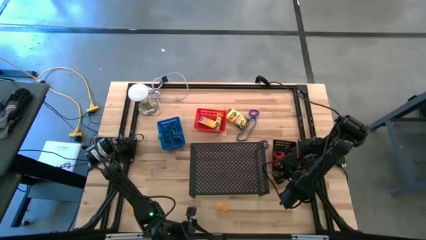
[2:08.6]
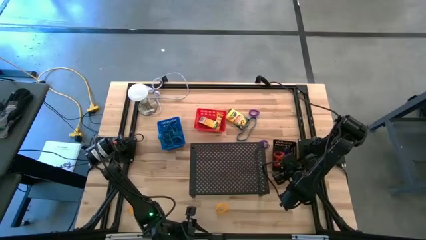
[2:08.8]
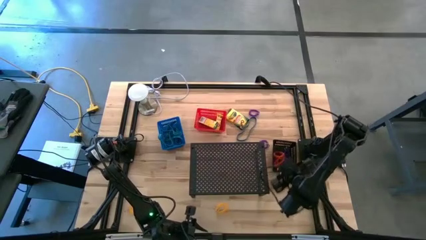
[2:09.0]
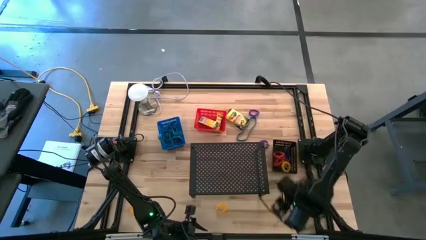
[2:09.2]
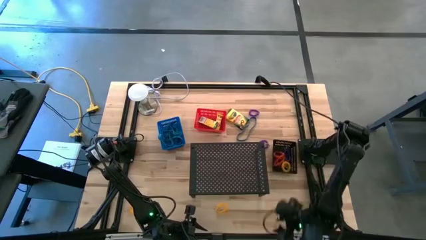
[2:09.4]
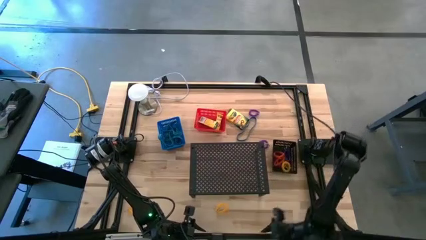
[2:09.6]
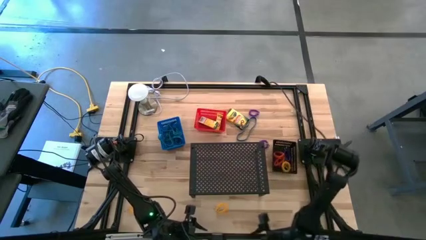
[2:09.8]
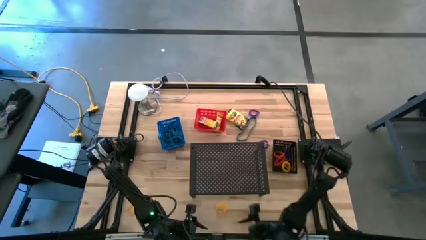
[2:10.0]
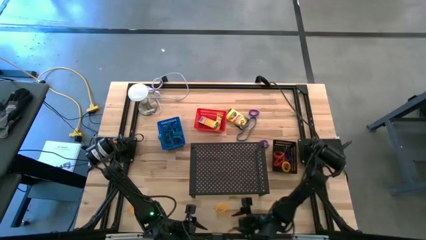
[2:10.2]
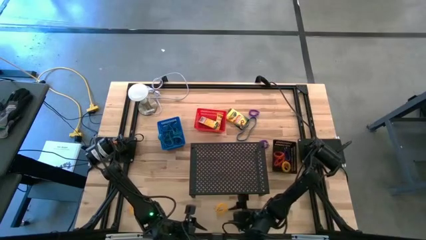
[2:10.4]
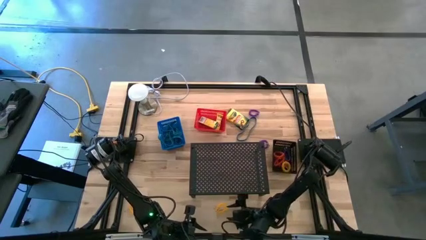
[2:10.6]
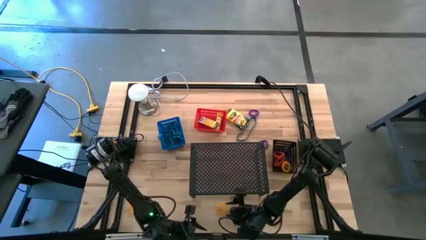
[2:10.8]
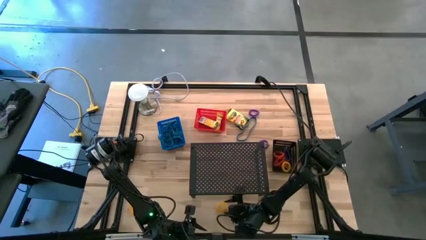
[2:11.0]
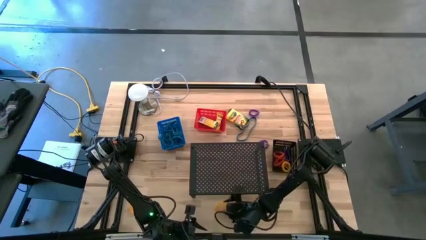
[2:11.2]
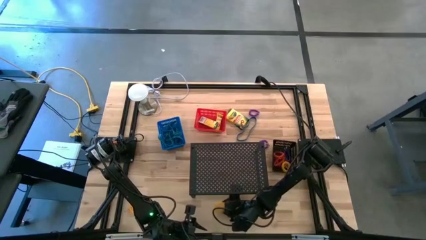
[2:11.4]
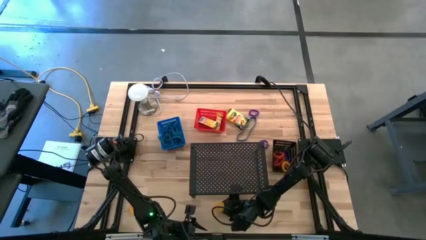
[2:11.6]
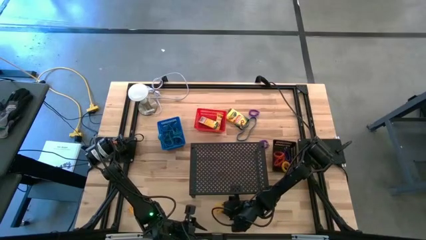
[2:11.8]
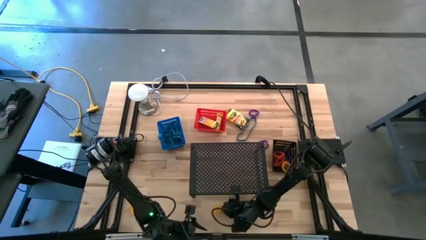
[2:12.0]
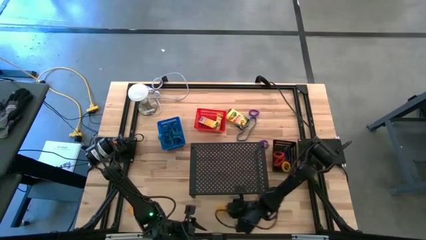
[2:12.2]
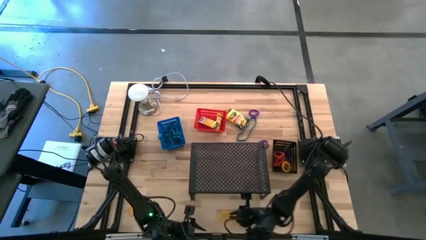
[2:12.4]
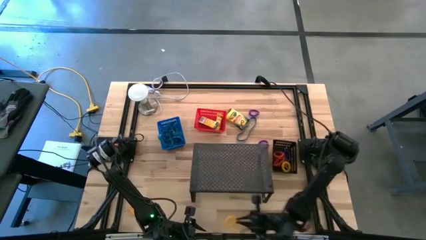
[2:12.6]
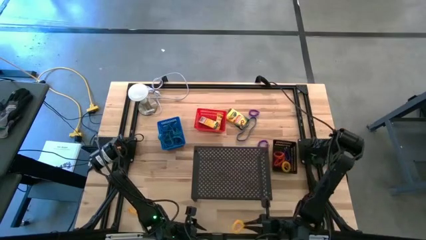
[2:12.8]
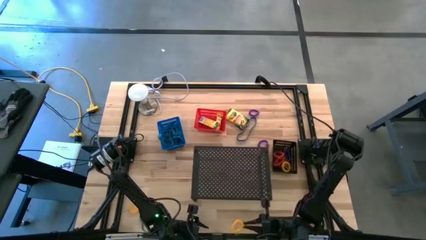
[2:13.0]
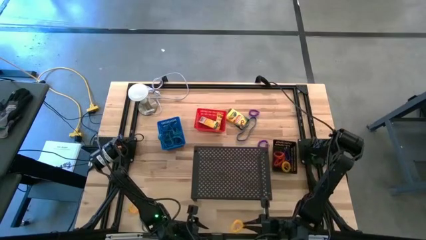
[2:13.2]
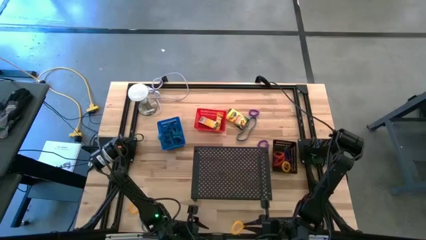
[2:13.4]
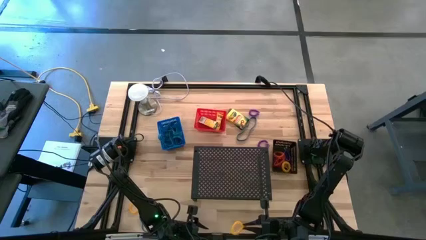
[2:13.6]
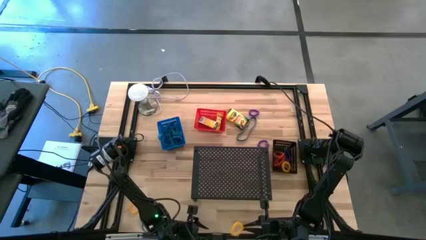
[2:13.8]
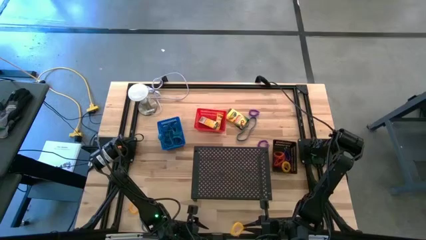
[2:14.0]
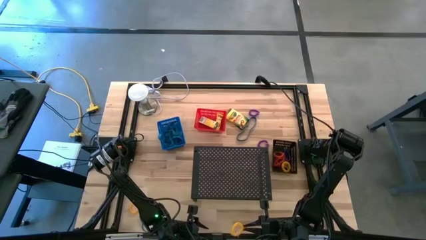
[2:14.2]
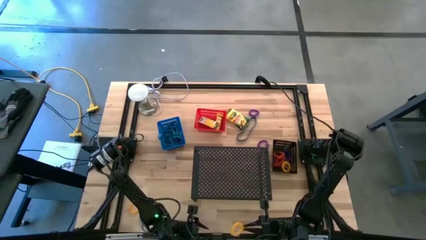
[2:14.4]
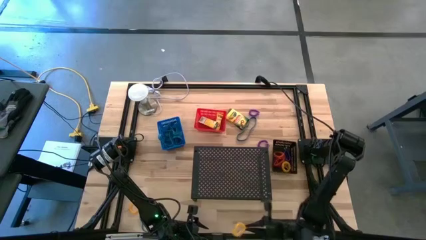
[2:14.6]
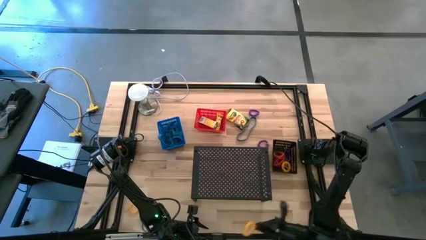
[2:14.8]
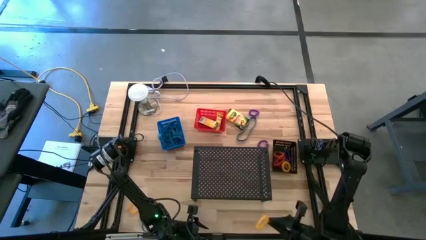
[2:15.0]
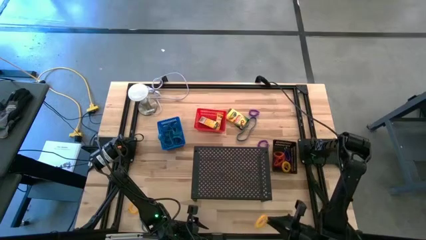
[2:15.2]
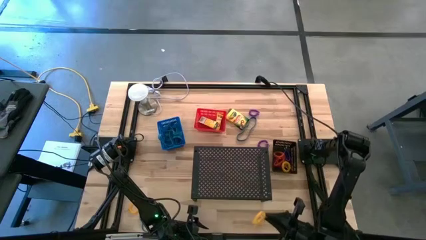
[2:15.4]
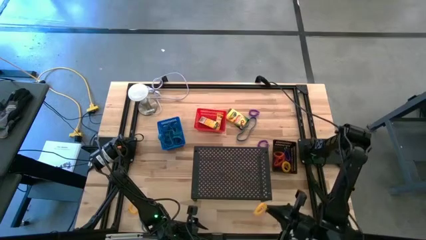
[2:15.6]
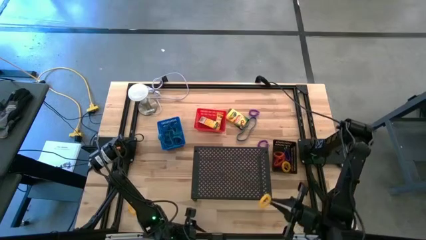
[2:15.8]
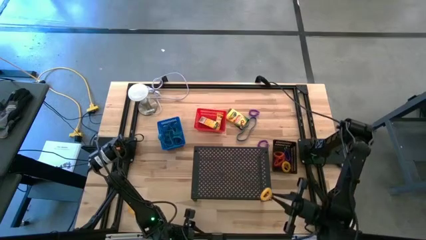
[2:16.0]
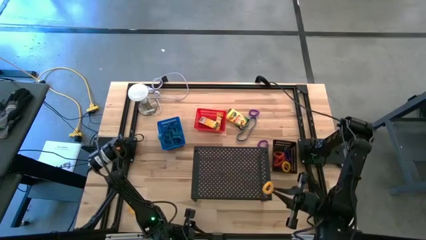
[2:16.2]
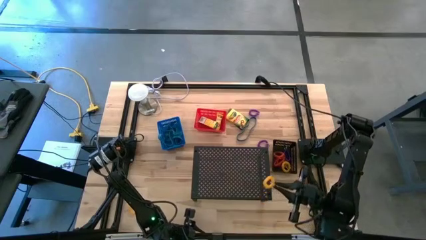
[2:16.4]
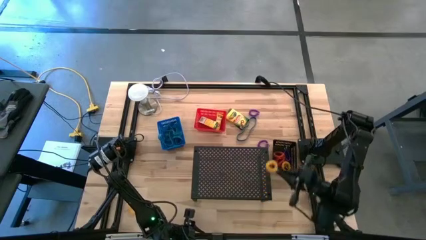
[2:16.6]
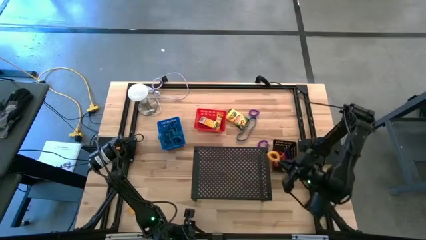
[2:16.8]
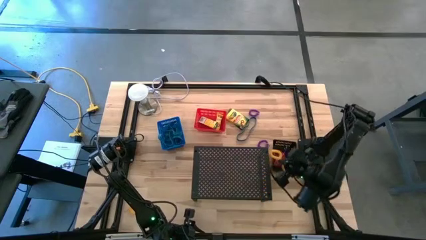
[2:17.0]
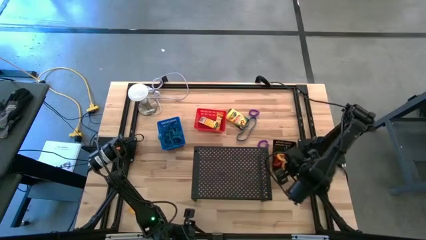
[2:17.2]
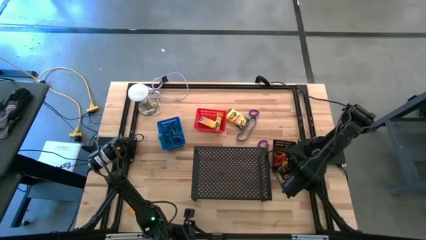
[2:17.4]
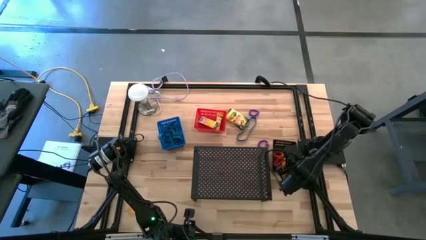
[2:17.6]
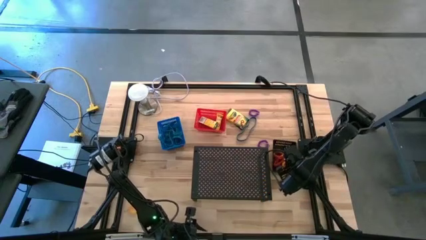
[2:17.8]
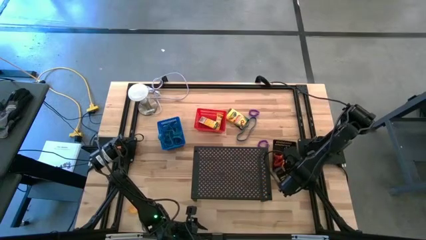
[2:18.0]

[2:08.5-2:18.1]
Task: Pick & Place Office Desk Supplies
Put he yellow spring keychain into the black bin

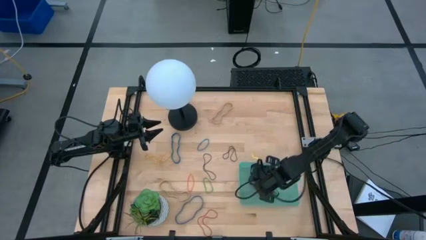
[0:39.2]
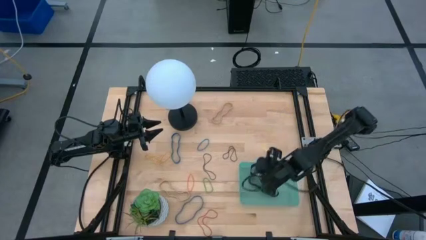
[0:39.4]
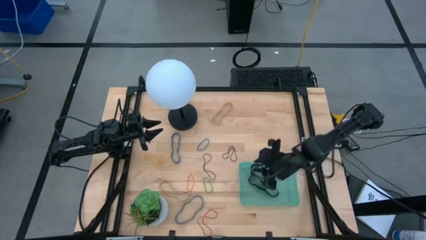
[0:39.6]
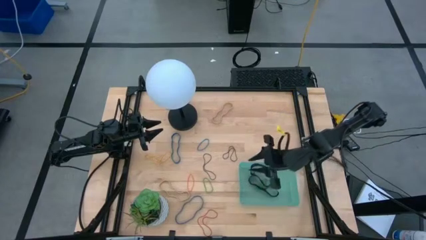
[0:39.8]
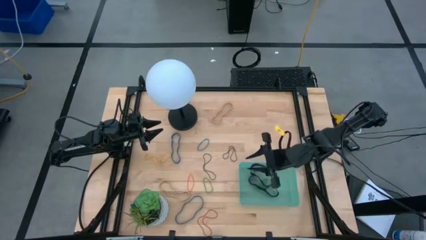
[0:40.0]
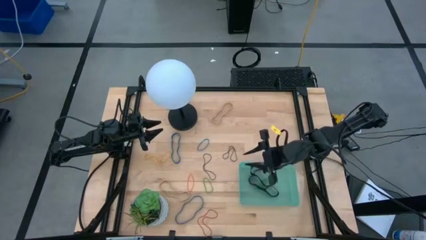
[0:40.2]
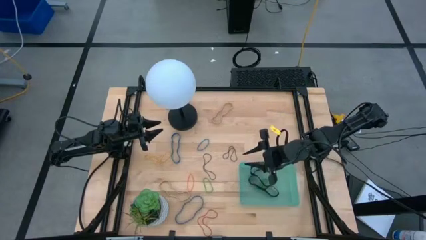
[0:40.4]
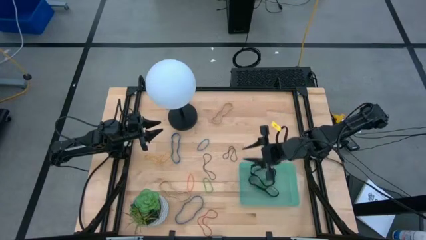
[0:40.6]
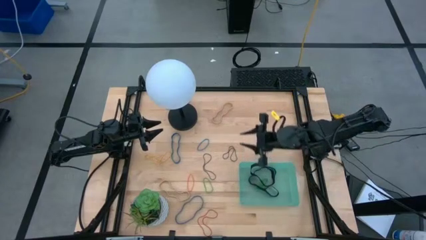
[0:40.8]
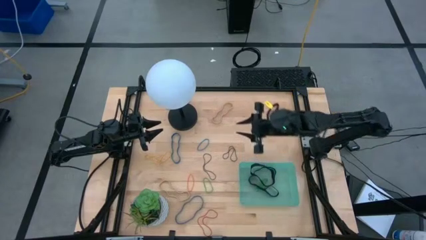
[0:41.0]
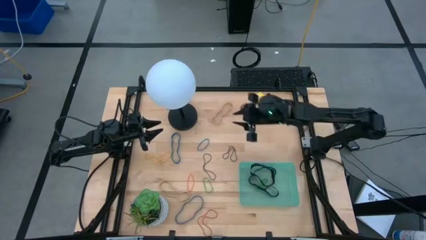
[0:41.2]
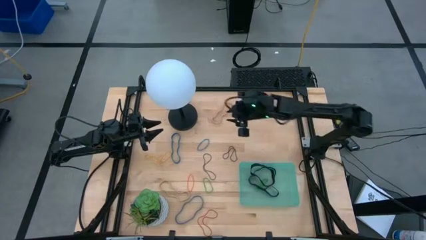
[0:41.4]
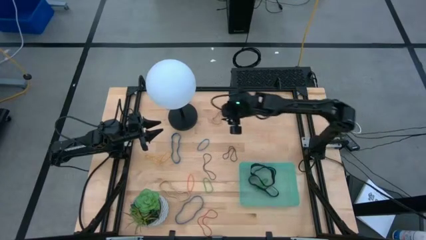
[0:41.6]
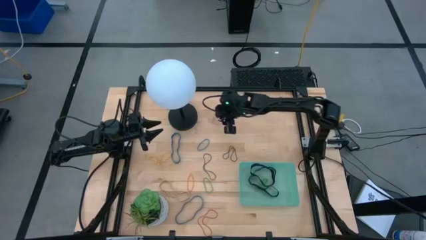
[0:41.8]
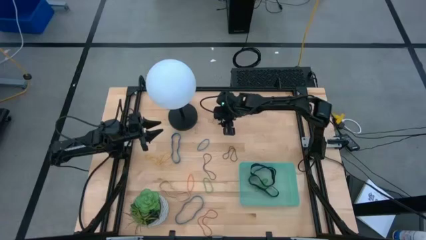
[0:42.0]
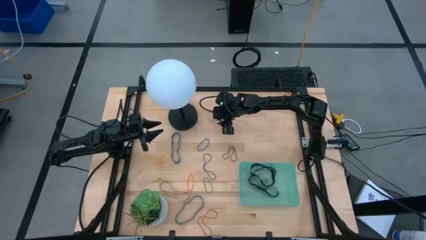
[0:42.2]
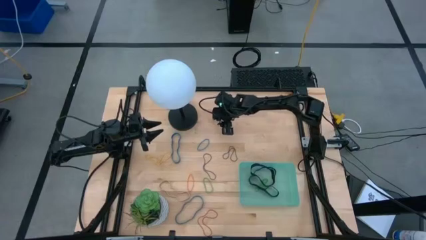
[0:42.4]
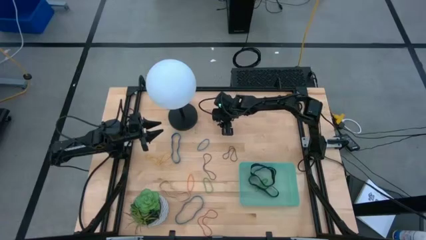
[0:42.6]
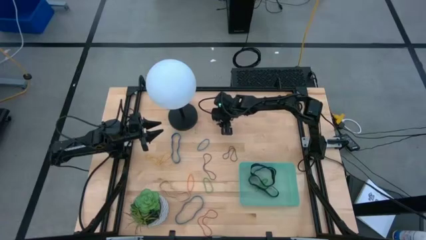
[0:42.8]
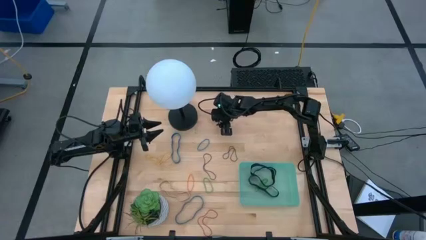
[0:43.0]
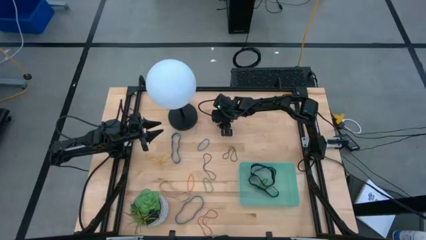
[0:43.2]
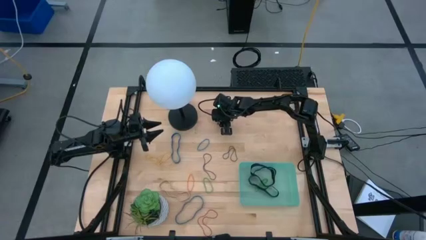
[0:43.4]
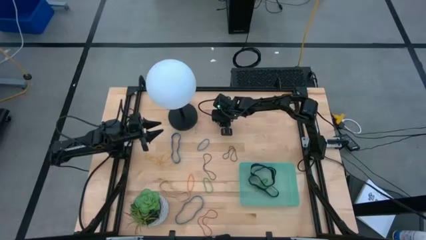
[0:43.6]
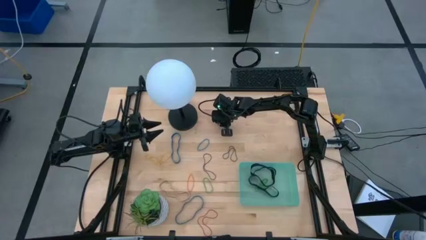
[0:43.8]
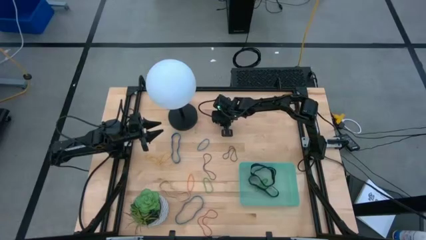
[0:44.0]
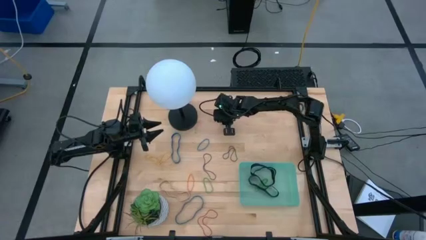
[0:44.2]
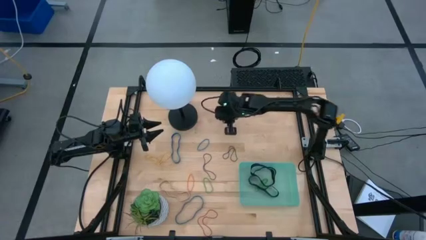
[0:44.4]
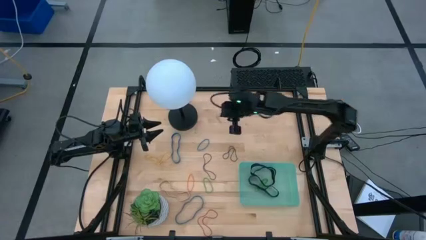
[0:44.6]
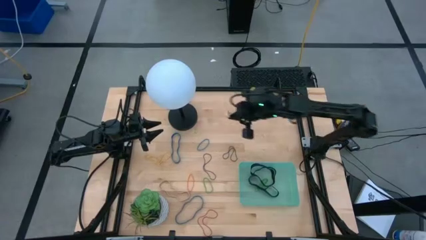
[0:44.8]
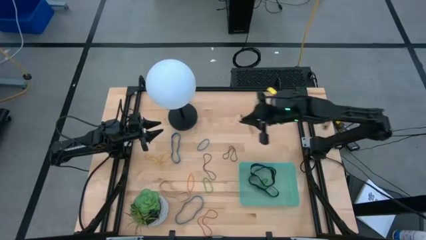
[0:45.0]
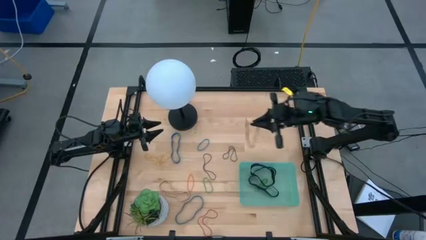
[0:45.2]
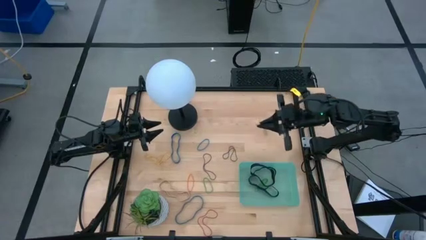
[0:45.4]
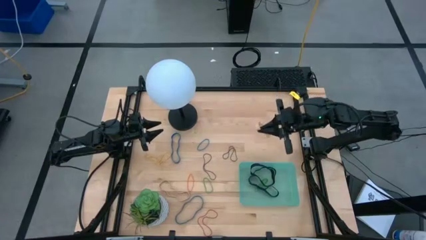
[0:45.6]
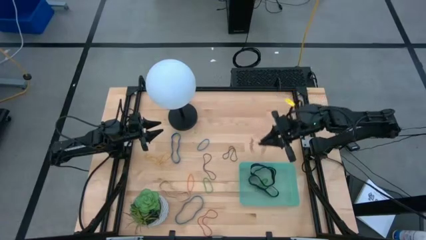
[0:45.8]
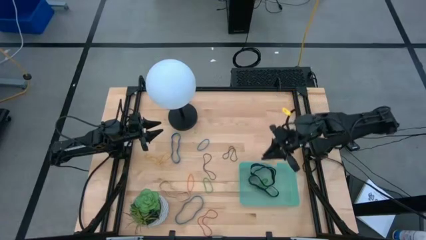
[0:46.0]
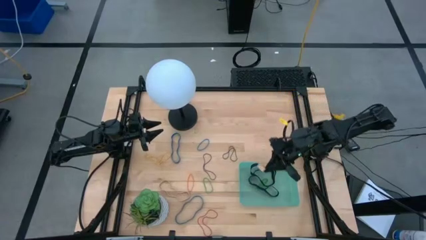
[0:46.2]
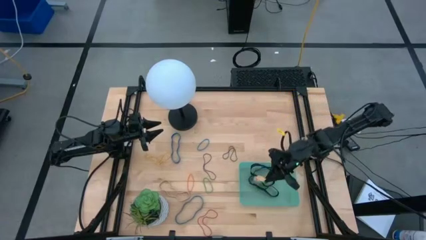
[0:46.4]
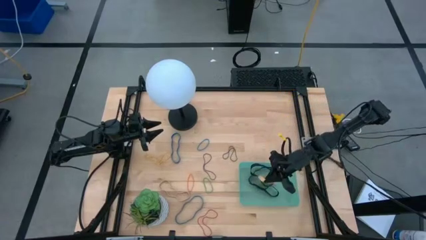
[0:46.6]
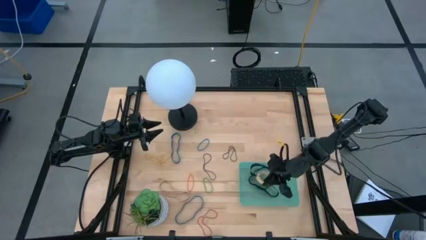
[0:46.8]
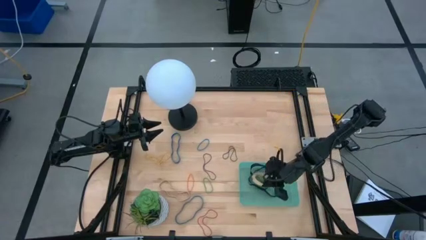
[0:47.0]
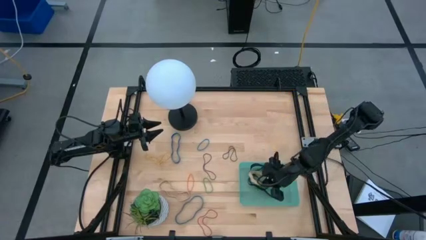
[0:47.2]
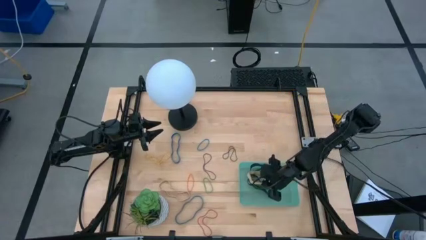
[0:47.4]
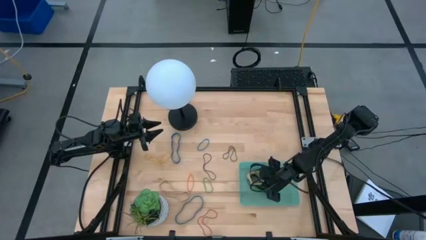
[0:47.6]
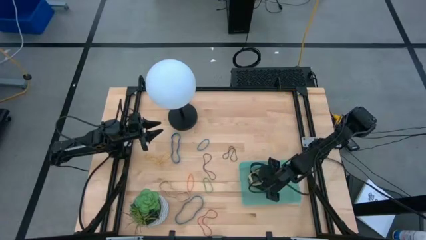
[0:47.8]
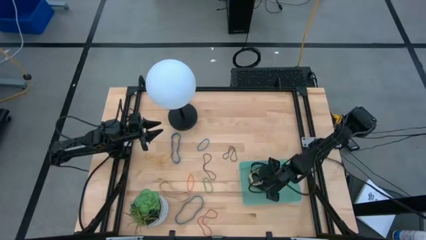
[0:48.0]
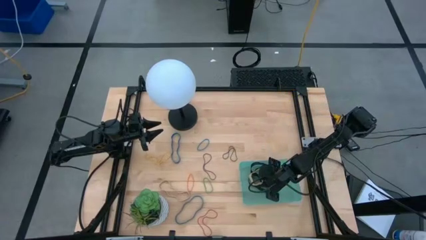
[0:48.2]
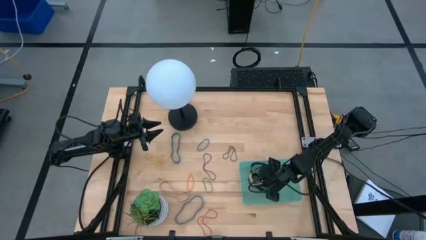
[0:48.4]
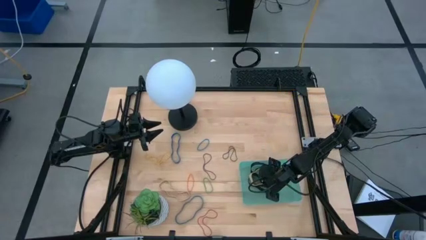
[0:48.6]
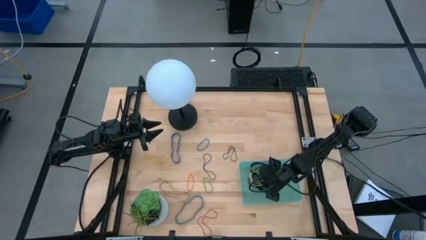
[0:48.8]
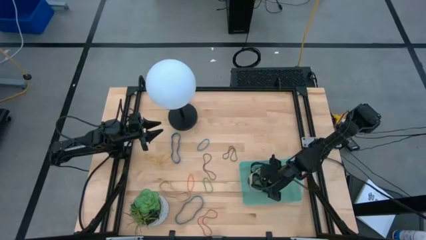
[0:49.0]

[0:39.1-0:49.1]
Task: Pick and place rubber bands into bin
Put the top brown rubber band into the green bin
